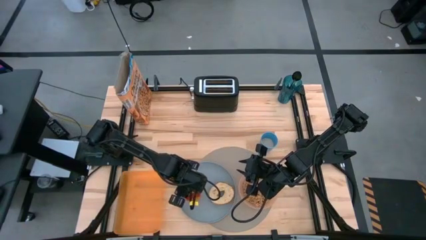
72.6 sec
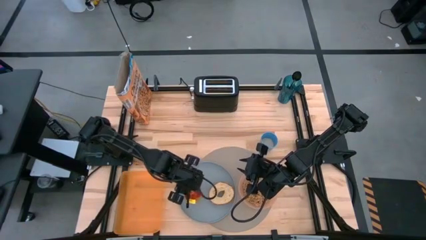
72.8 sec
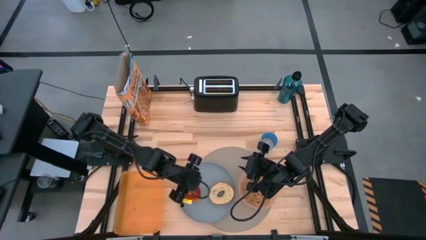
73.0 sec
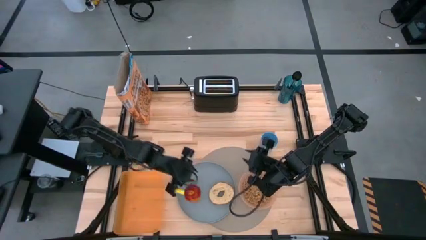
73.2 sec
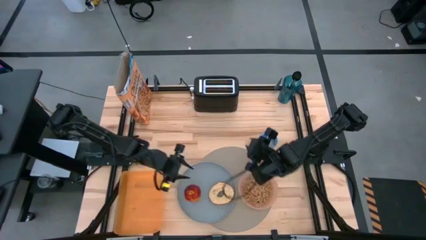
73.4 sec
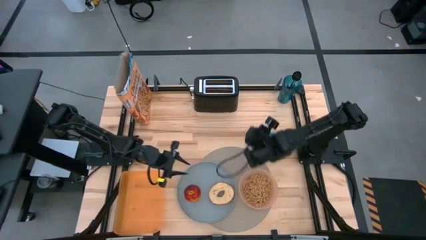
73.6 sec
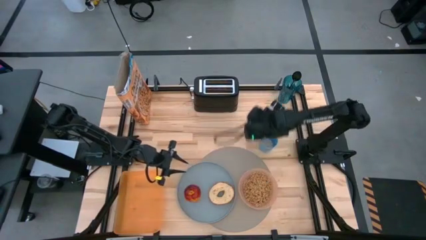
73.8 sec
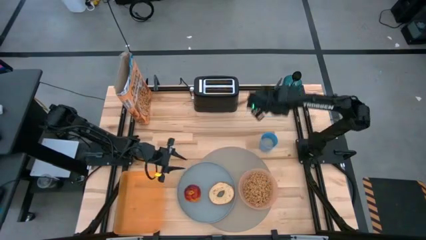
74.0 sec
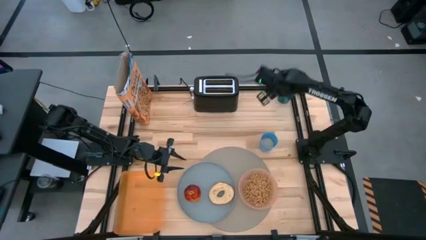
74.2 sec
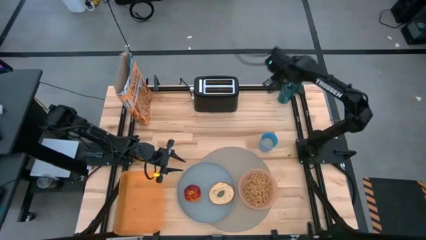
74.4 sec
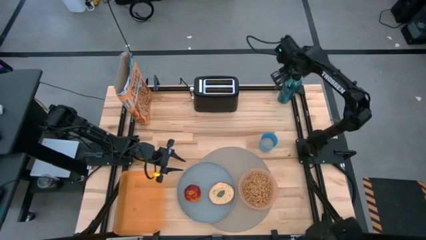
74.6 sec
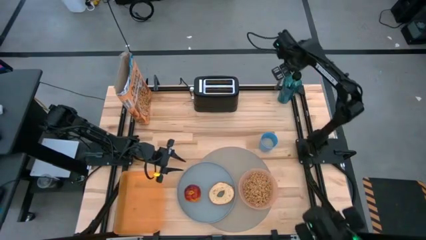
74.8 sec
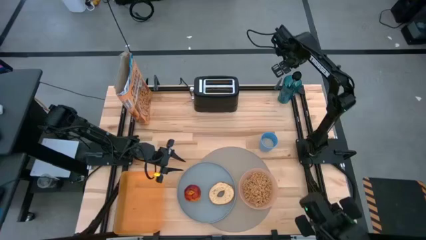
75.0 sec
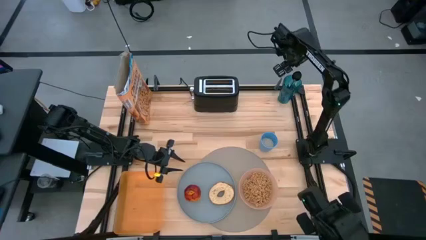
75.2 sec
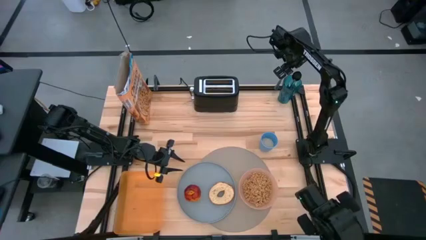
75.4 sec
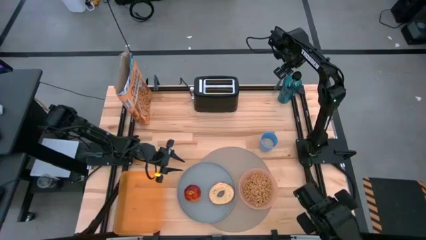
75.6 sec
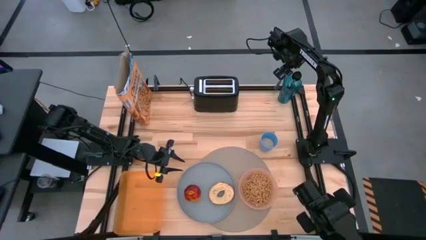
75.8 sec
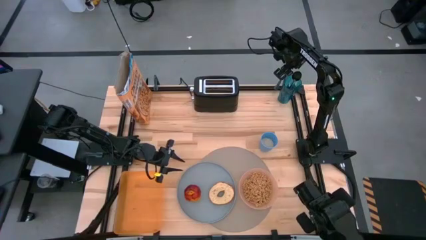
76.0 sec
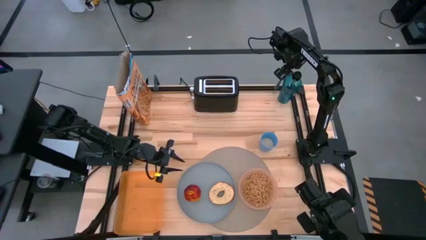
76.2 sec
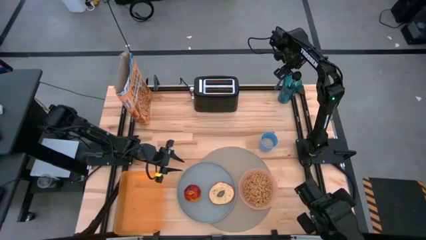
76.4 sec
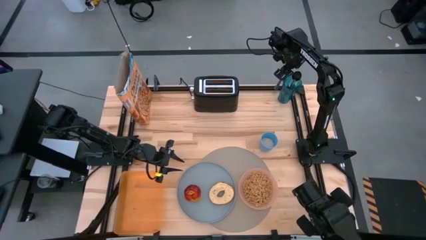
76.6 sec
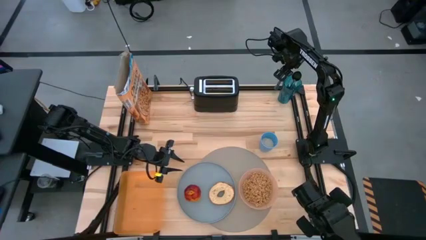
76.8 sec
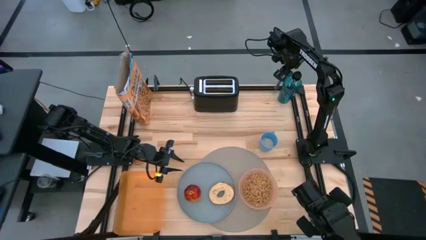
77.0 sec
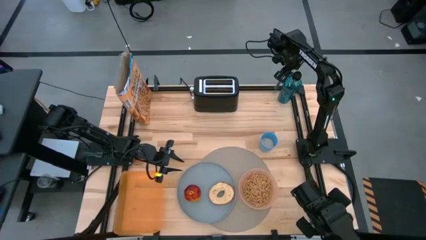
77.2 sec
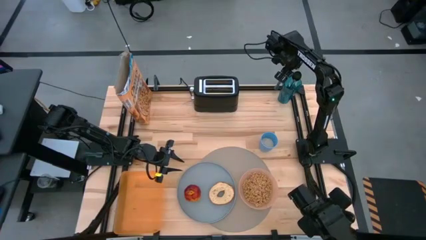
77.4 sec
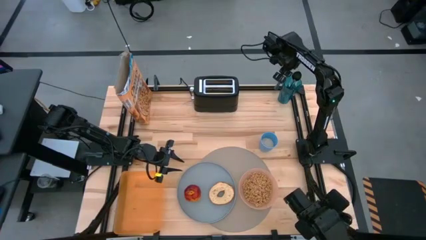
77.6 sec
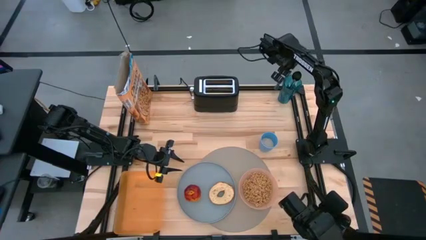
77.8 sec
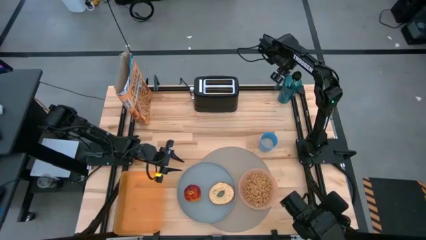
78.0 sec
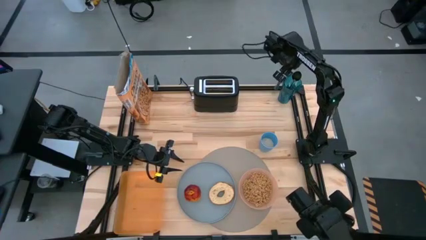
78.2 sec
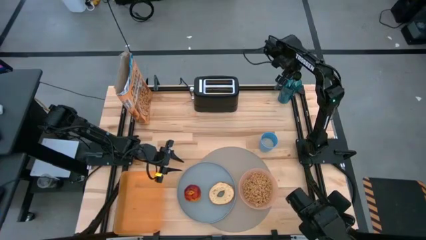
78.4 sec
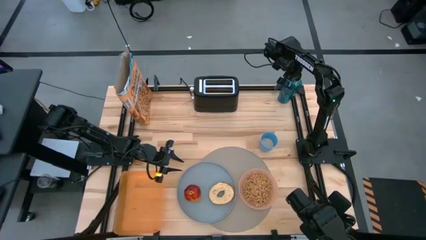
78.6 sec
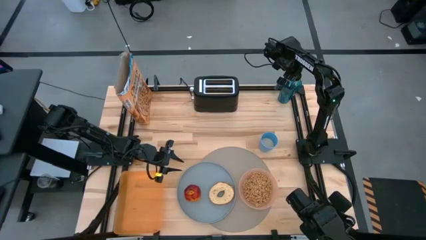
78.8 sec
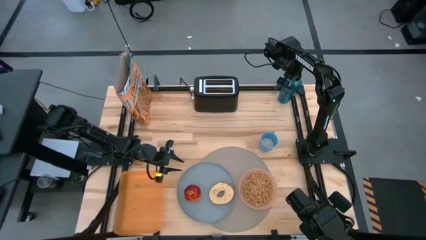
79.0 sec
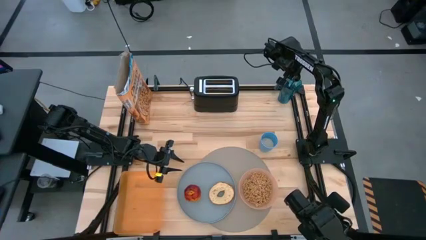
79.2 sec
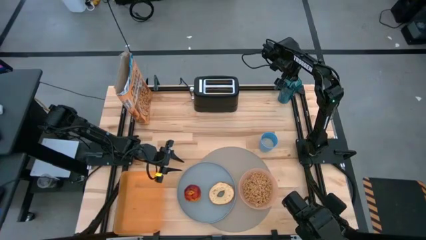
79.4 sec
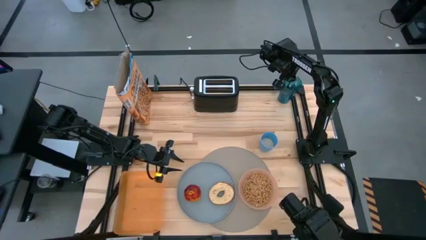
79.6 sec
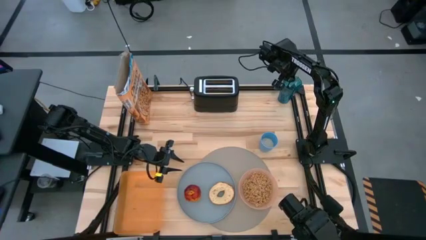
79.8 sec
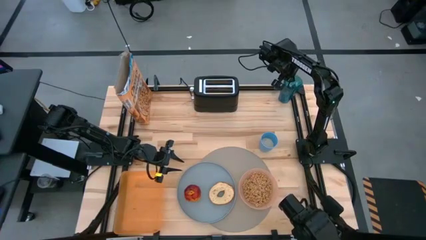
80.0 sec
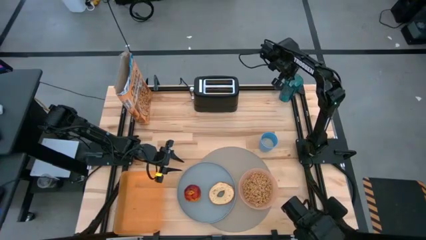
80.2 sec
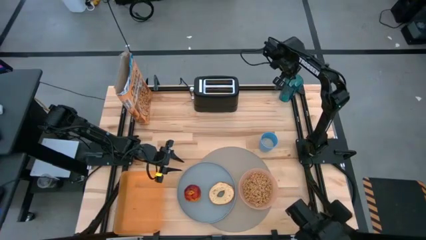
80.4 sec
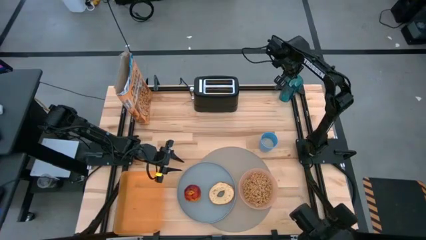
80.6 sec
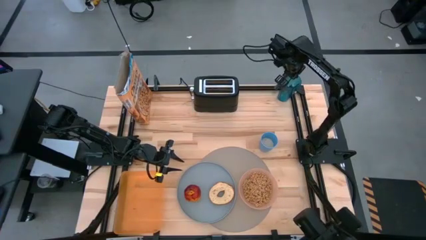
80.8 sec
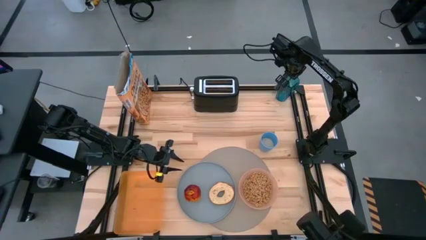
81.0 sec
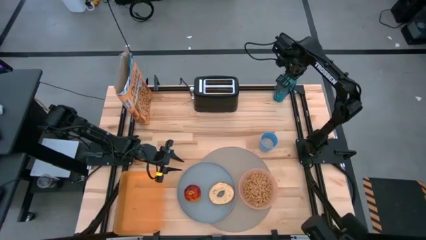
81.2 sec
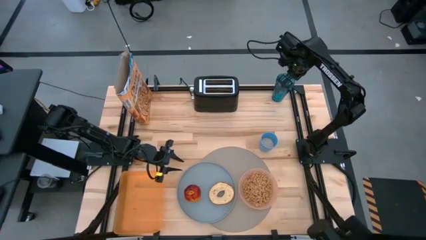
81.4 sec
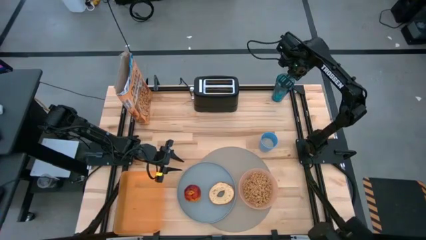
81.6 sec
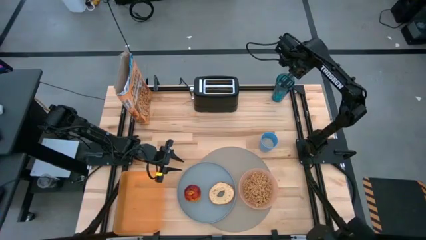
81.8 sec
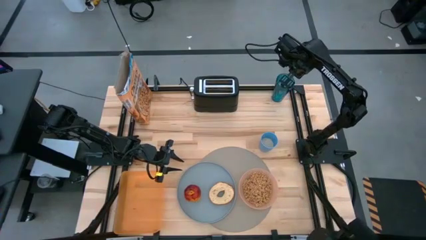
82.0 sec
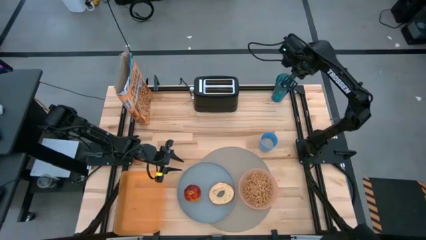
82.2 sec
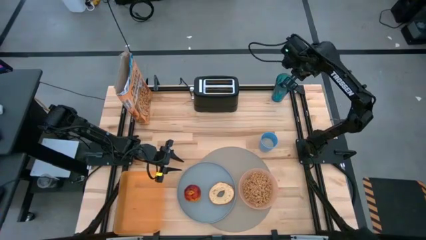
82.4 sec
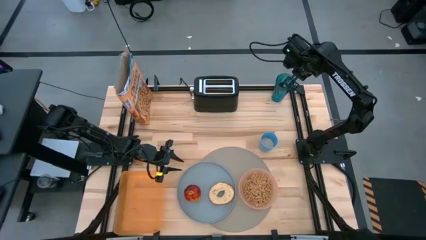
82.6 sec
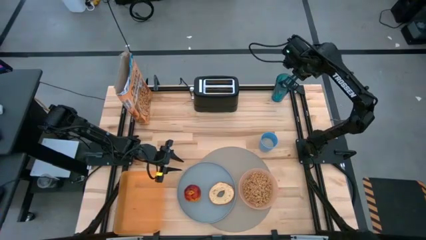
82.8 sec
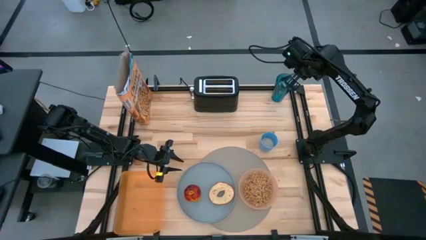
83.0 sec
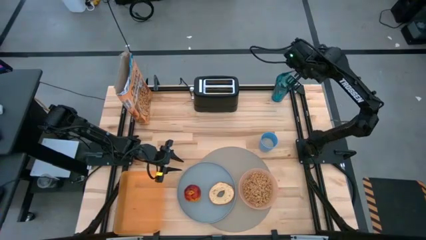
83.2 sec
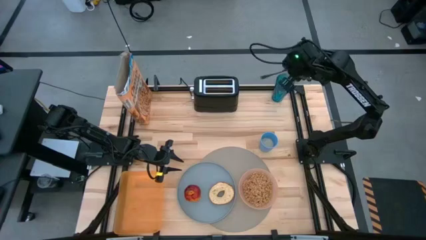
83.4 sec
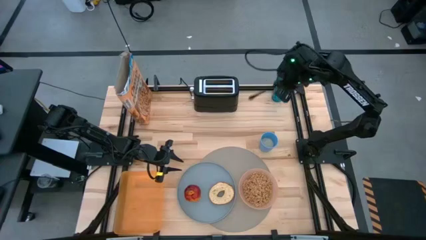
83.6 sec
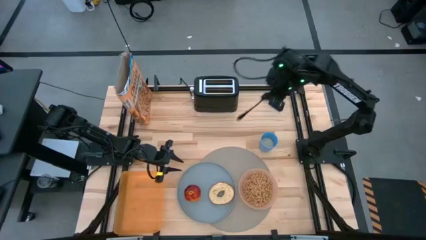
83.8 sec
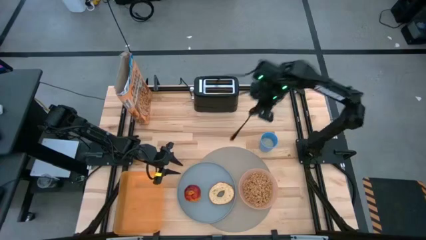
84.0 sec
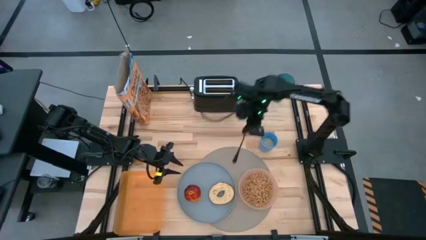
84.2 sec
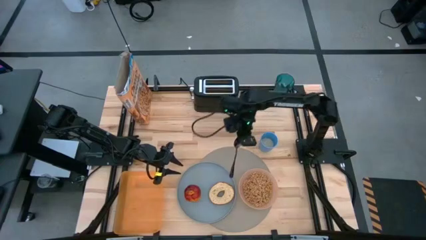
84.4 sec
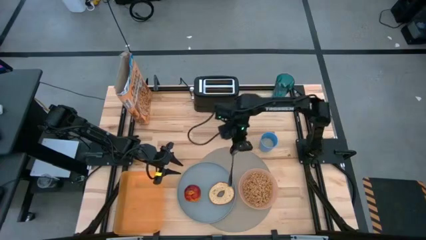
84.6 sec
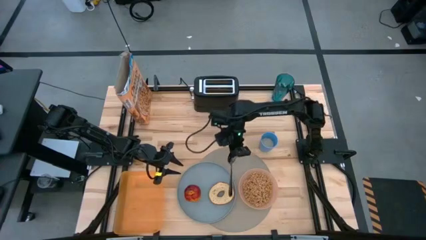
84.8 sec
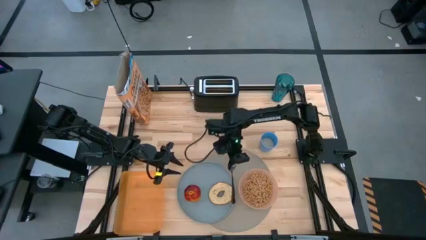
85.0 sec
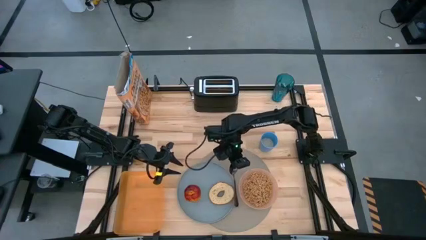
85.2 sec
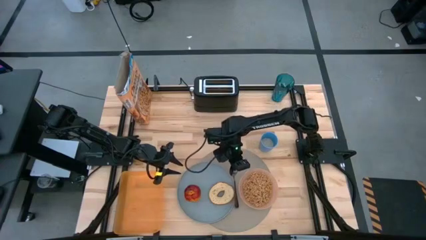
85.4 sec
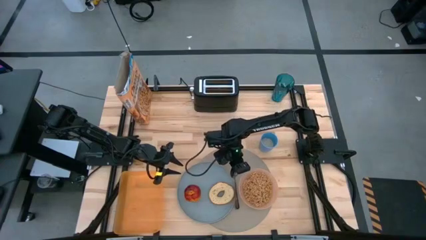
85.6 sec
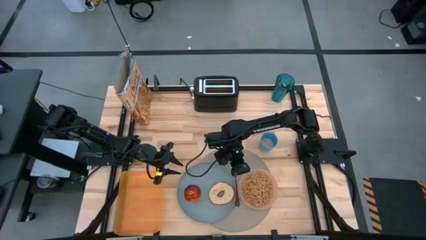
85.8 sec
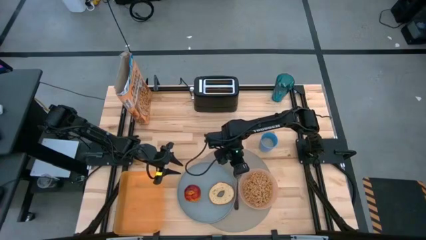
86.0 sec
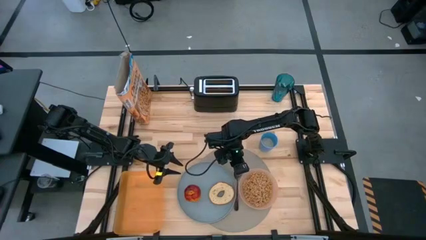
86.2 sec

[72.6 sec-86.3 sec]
Task: Arrange a breakfast setting
Put the spoon on the middle of the table placemat

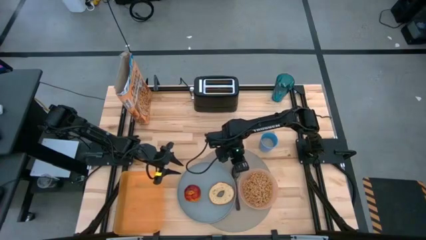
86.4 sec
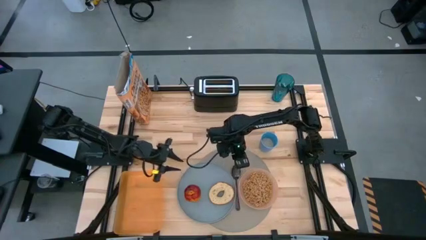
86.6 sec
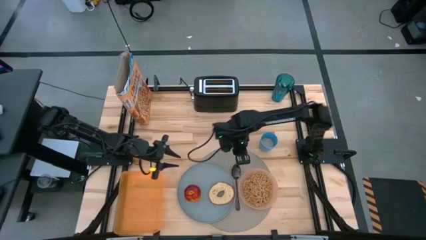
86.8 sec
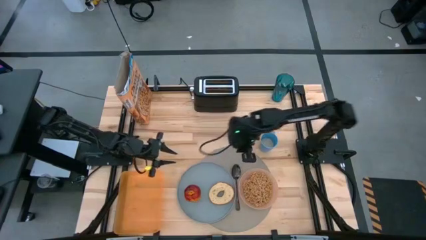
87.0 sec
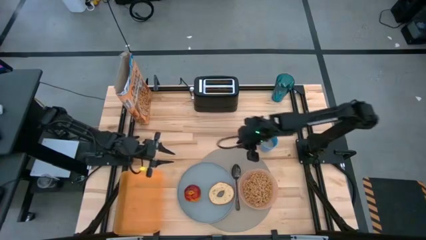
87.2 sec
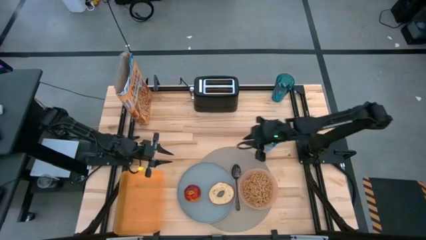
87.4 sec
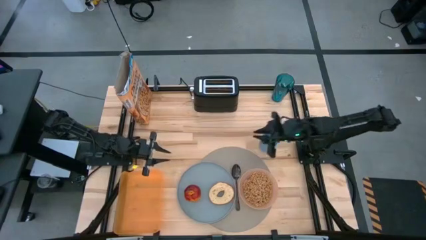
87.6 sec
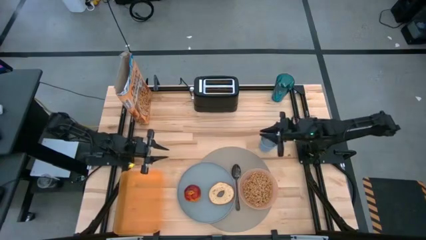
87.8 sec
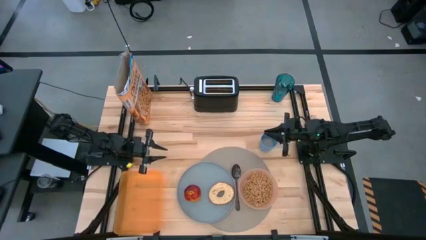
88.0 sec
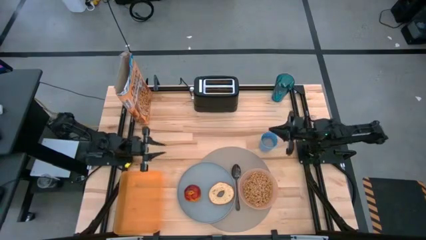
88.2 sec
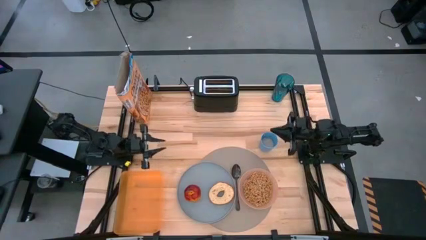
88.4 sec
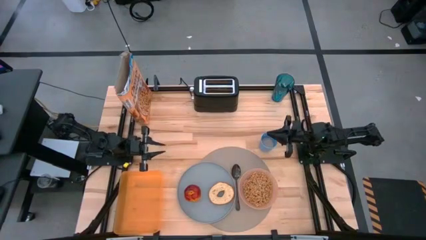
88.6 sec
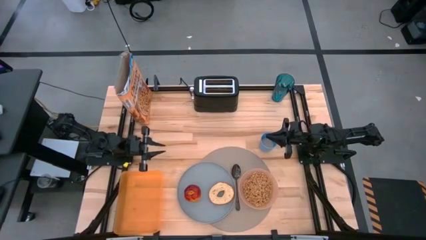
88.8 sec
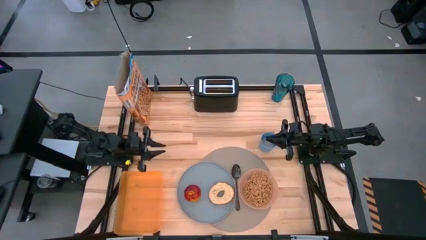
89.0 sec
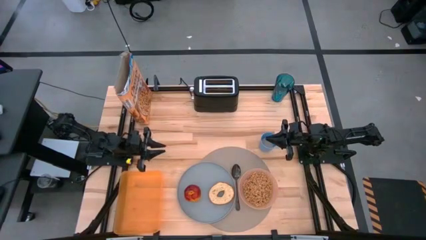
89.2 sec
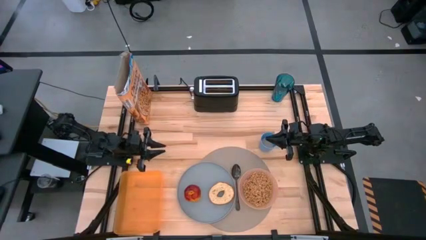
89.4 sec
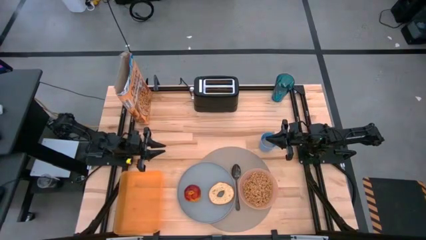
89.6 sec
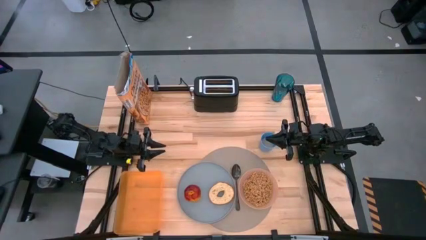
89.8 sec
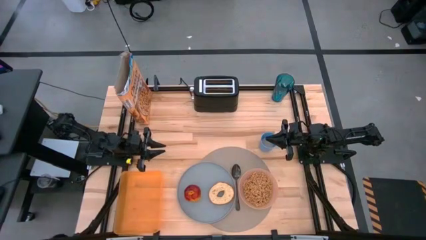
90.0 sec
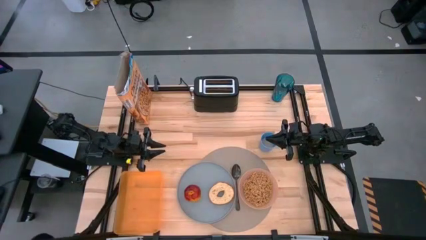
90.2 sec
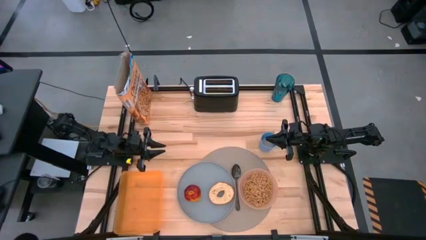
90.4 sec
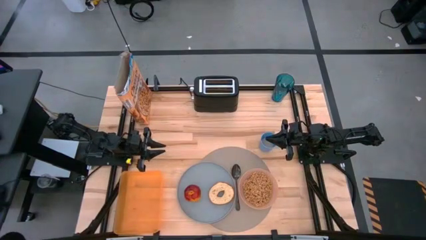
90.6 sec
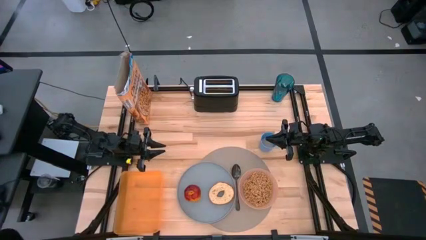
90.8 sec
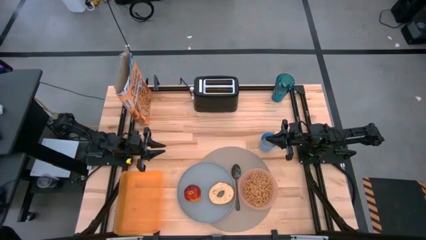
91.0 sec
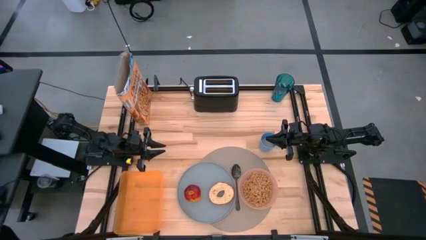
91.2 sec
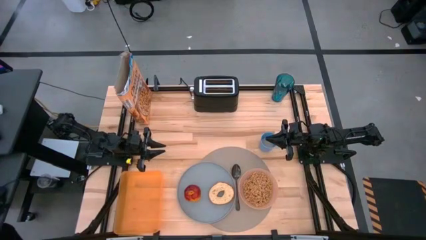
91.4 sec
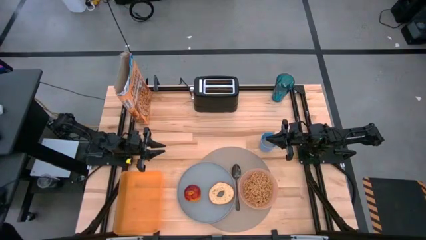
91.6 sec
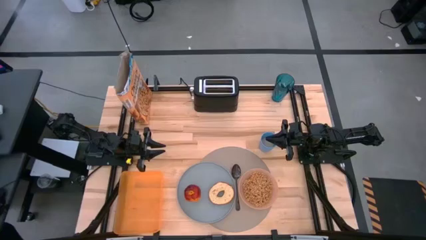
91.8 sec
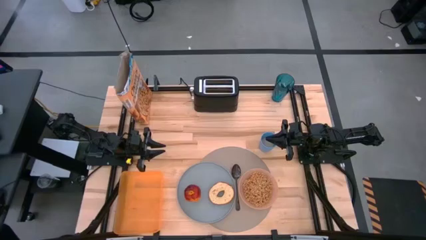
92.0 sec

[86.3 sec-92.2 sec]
Return to Home Position
